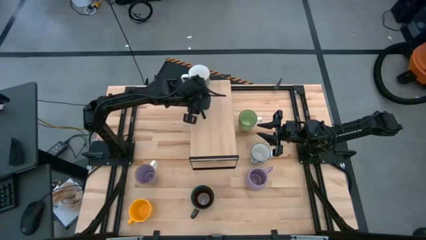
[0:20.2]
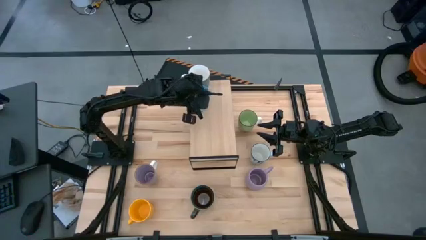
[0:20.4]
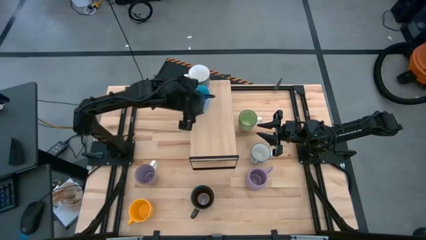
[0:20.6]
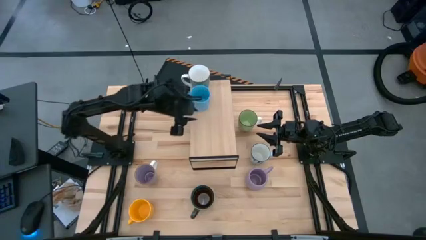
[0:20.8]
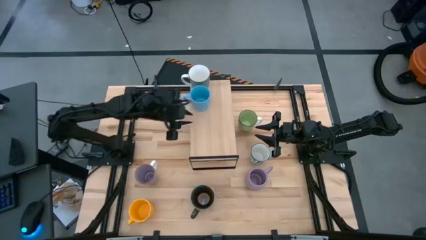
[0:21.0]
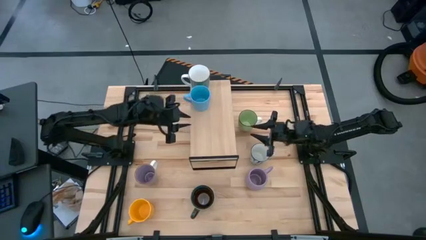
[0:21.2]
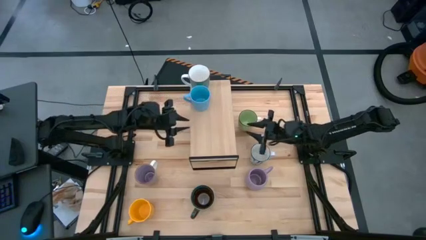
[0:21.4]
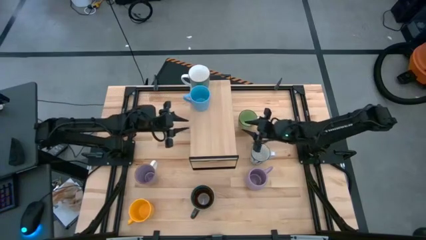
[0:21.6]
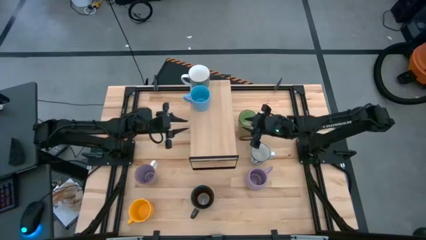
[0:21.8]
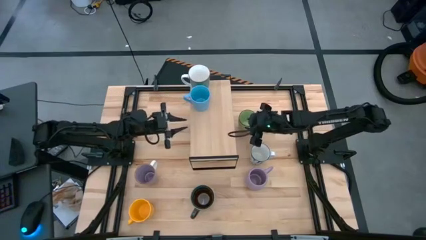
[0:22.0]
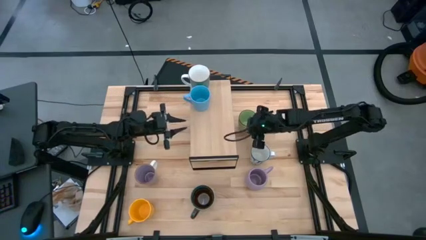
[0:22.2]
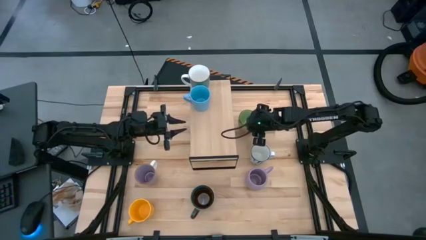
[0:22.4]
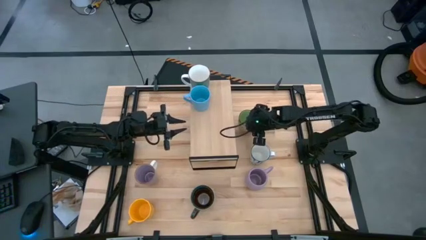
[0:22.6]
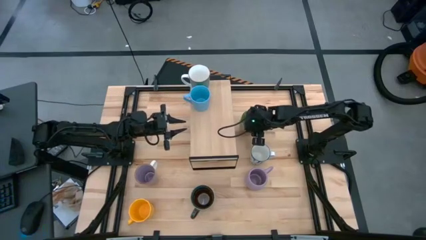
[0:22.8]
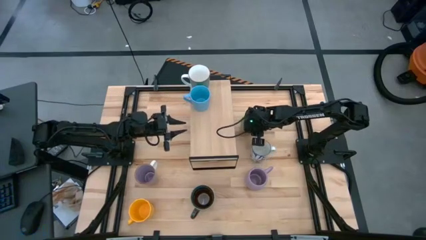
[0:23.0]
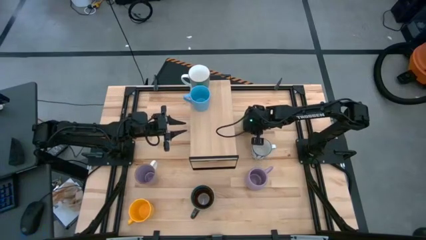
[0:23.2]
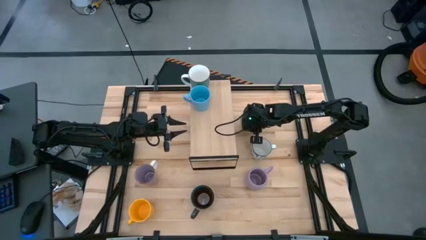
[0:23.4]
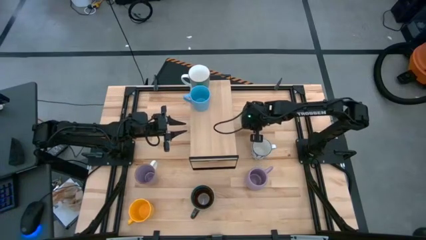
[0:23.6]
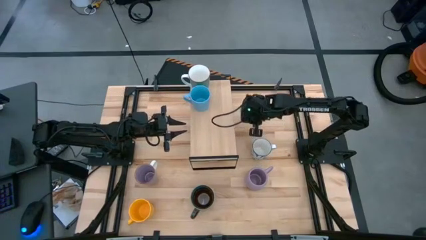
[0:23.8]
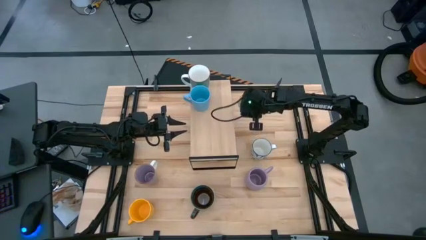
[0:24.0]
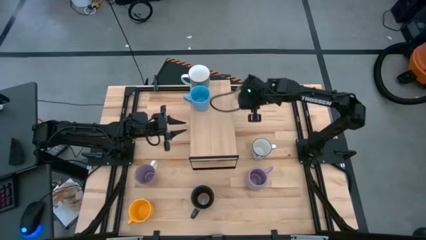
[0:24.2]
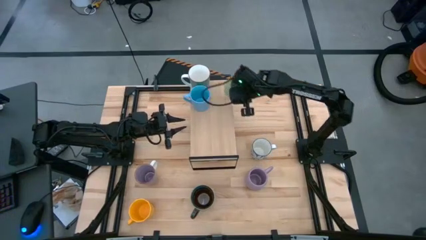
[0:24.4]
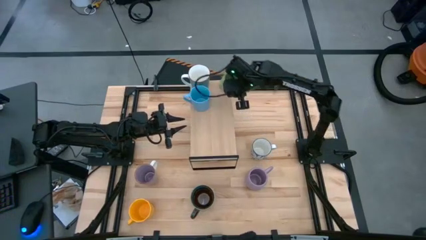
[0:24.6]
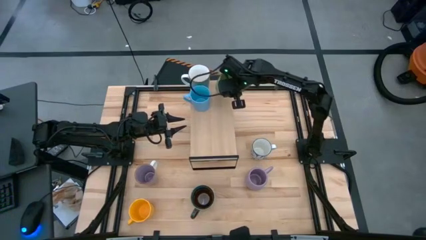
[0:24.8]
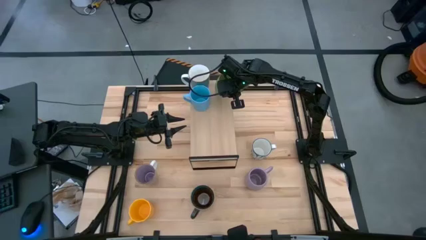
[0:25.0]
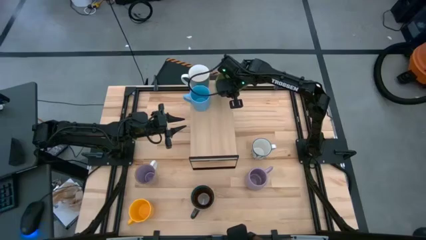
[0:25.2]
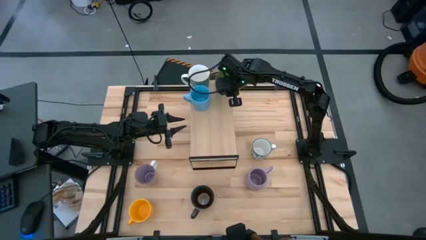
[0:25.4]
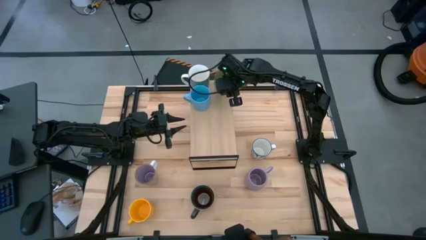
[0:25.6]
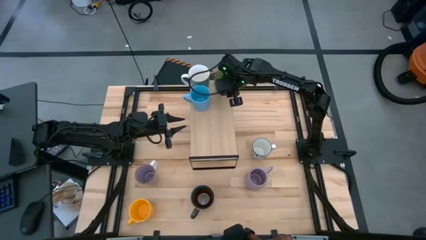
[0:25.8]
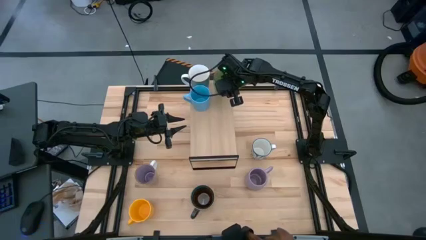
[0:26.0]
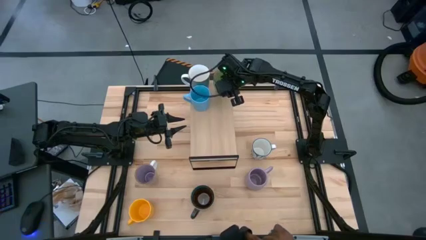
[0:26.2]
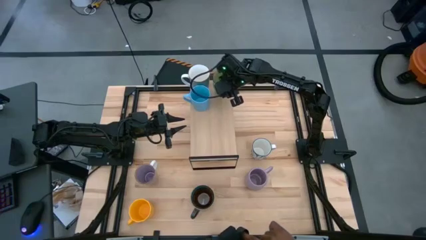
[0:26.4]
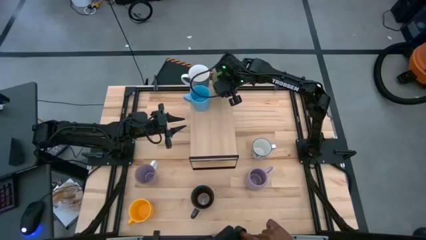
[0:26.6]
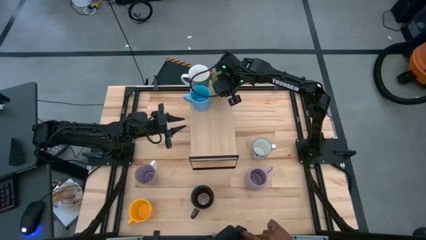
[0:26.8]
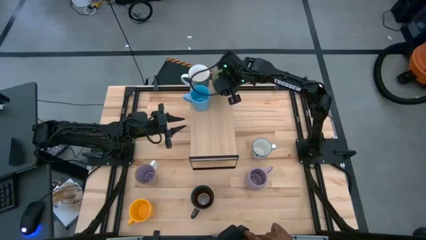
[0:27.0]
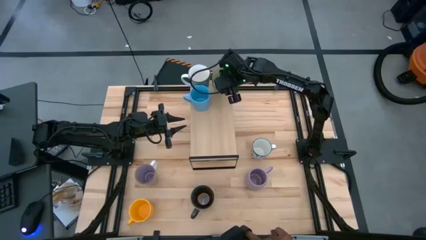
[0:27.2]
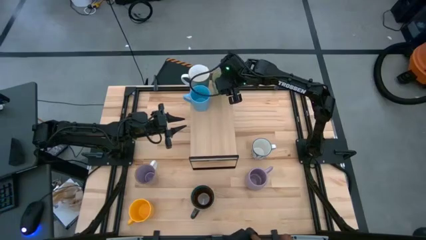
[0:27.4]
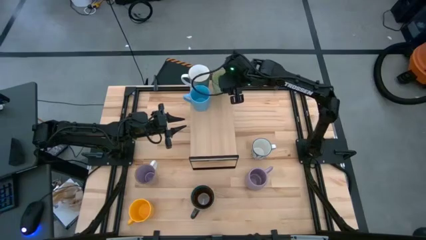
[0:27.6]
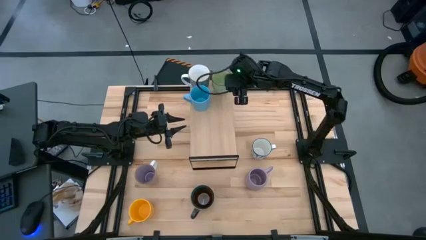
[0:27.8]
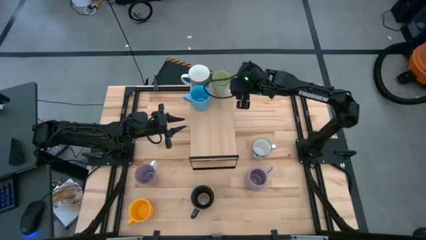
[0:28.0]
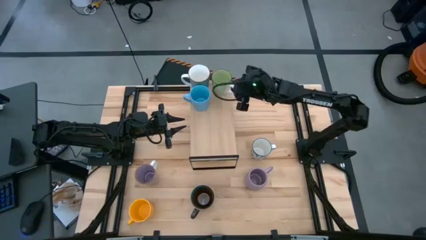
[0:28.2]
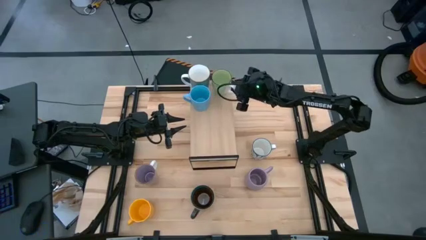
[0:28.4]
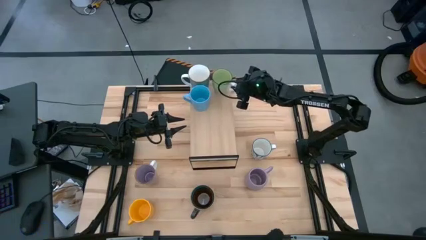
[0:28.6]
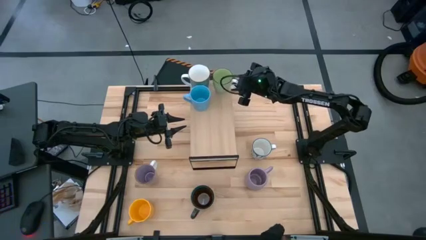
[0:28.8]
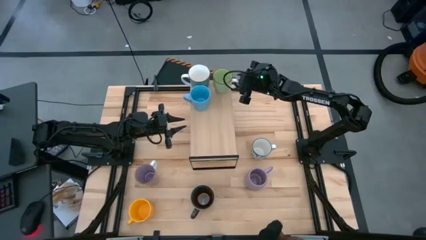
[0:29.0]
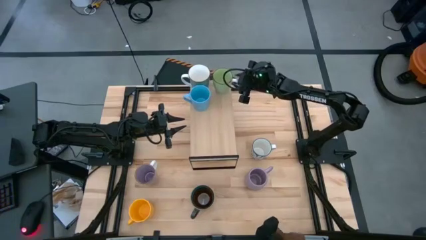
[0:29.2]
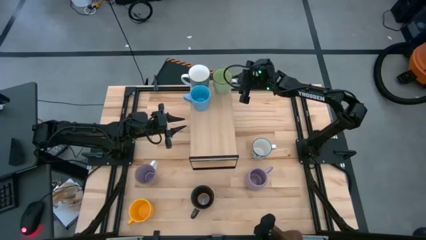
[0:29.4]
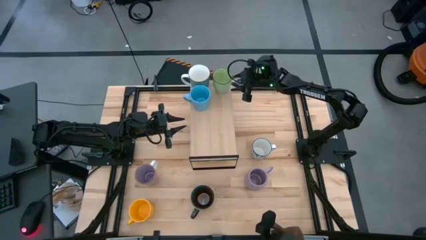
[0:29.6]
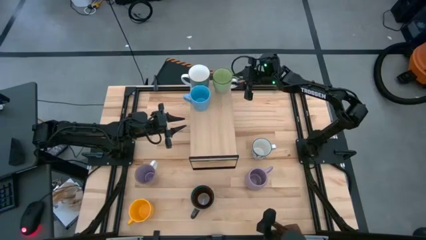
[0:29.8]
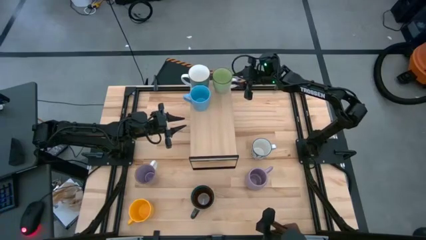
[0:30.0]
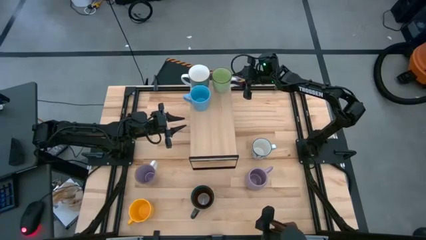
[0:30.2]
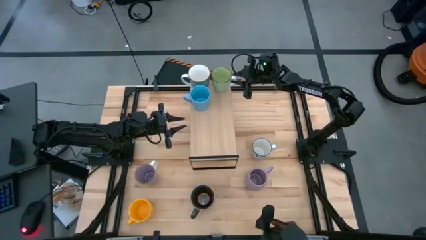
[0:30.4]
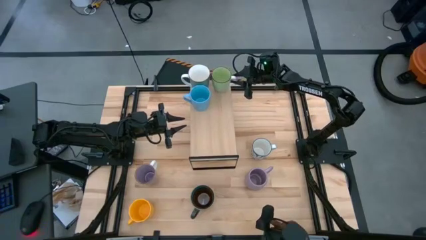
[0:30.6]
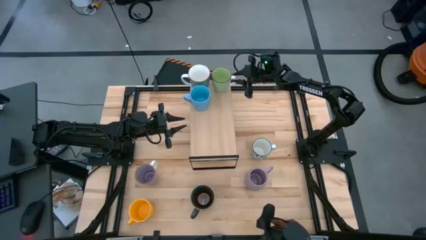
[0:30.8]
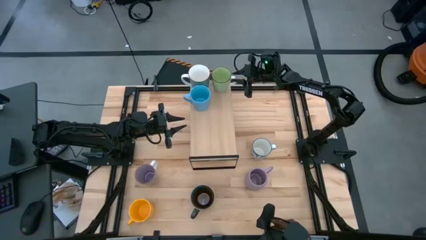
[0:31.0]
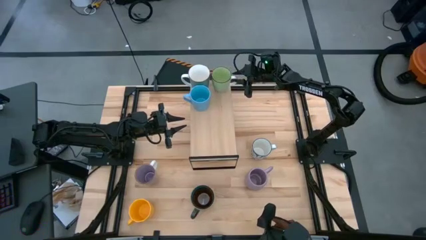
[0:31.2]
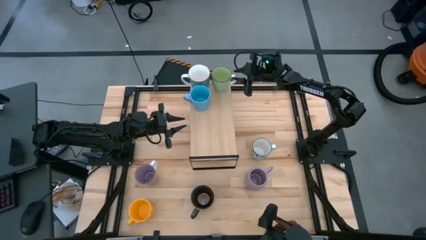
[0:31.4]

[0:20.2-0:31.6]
Task: Place coffee mugs
Put the green mug on the shelf

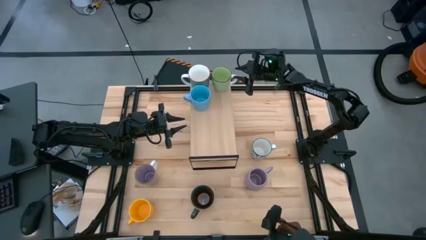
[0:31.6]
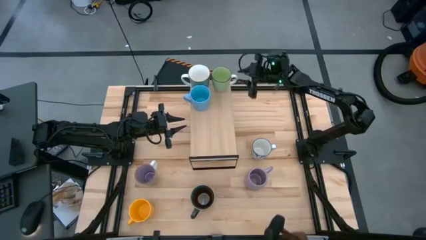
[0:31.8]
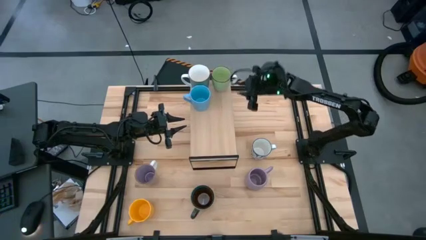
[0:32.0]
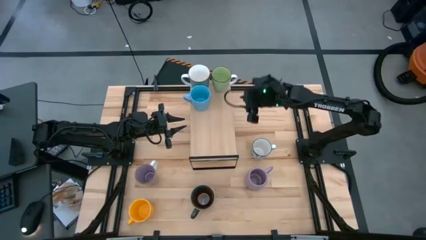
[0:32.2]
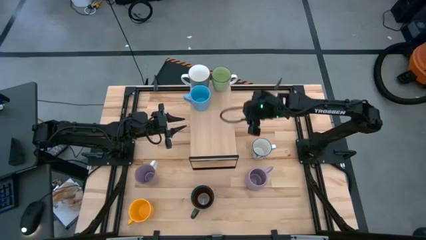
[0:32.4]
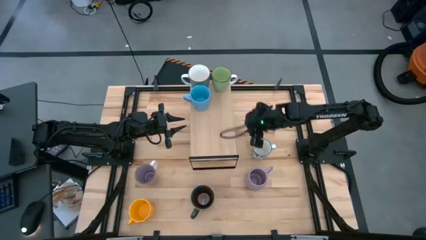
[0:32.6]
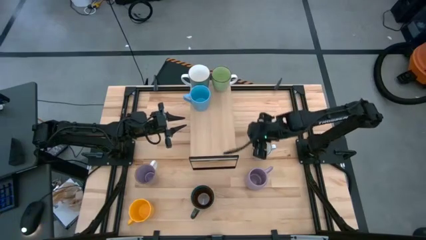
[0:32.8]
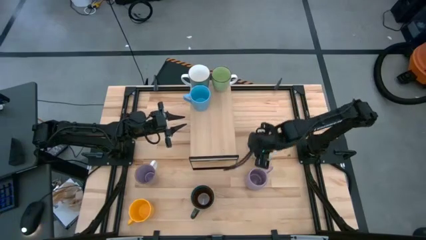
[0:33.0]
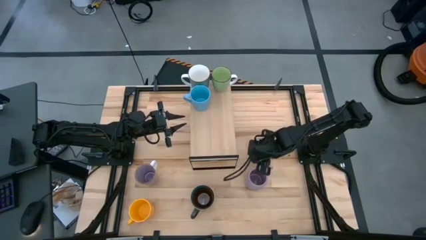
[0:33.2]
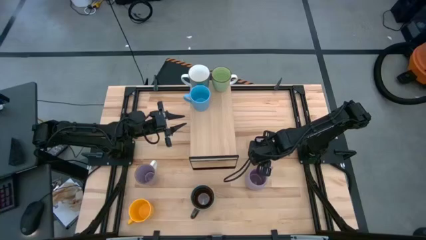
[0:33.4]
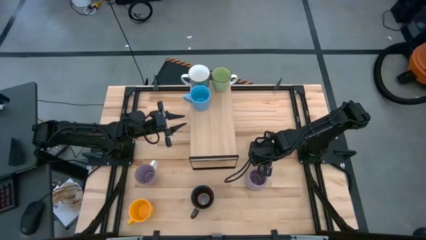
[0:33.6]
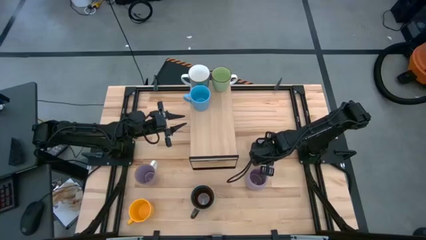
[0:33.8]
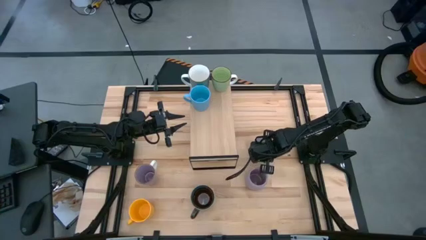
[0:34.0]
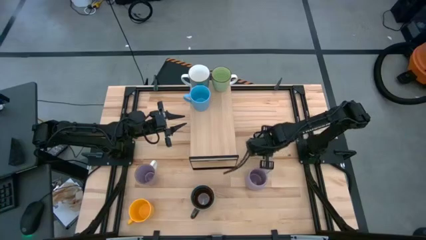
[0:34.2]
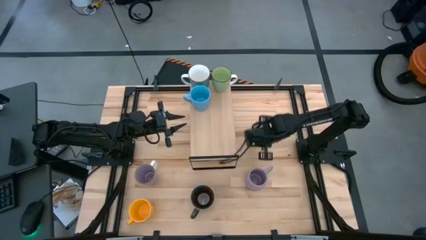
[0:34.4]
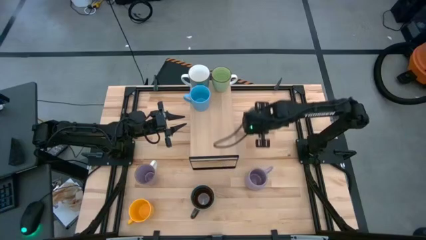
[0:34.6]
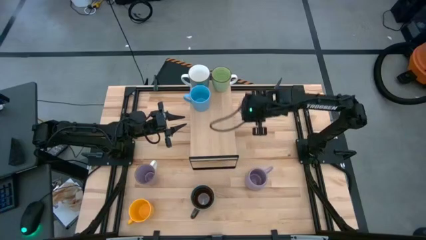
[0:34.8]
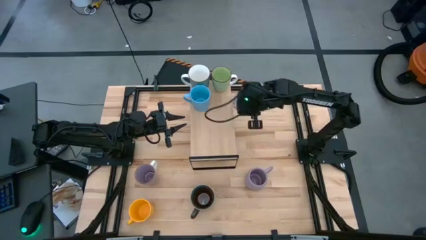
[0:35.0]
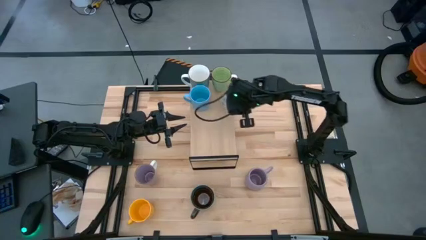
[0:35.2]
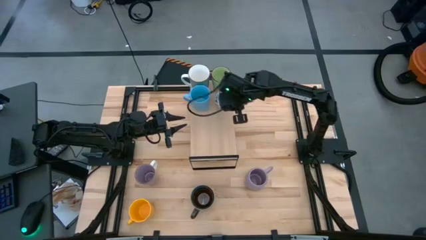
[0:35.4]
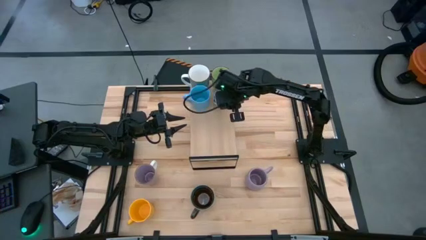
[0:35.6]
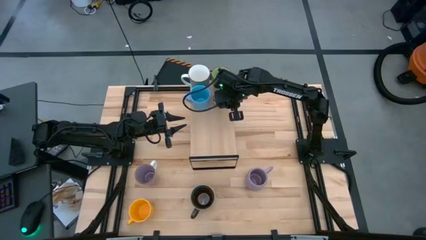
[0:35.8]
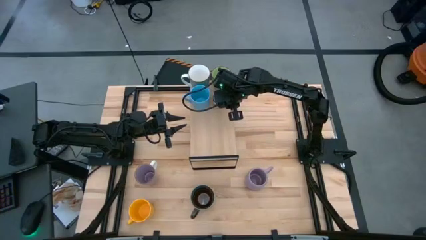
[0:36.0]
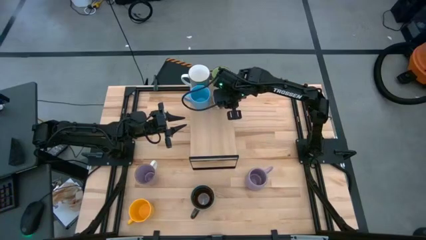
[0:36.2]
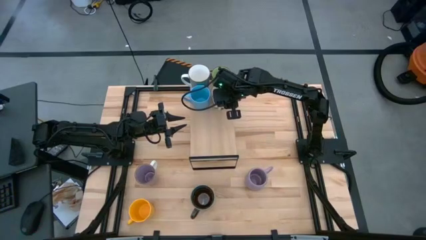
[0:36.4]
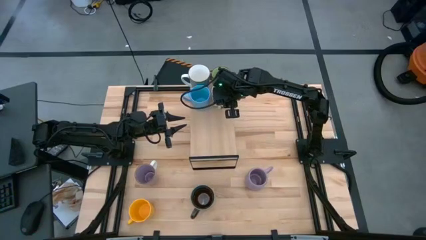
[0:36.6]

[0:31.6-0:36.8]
Put the blue patterned mug on the shelf
